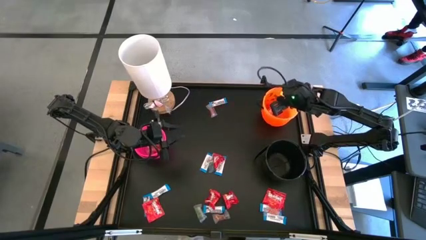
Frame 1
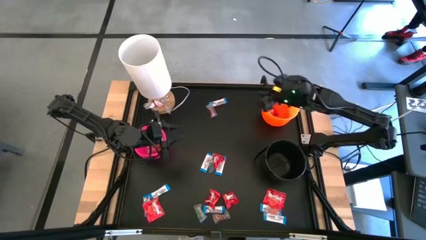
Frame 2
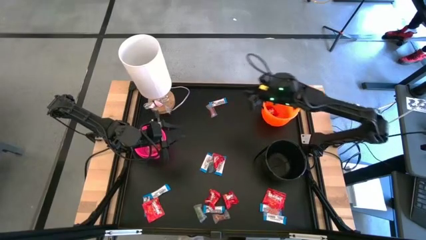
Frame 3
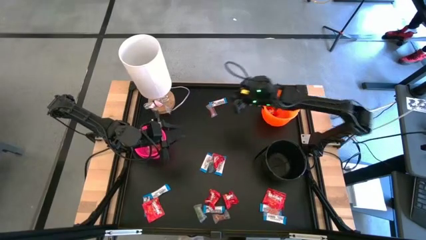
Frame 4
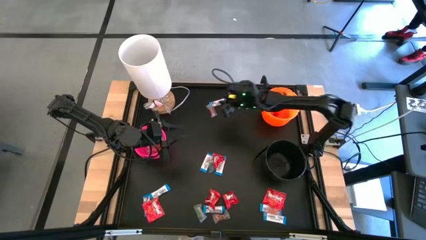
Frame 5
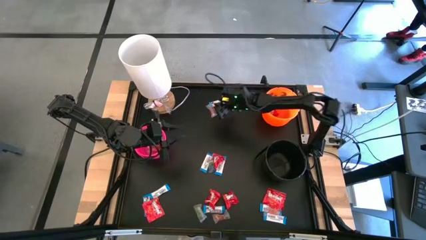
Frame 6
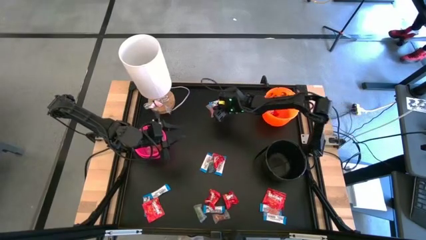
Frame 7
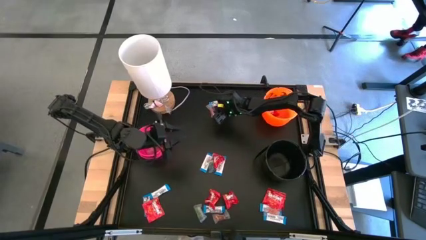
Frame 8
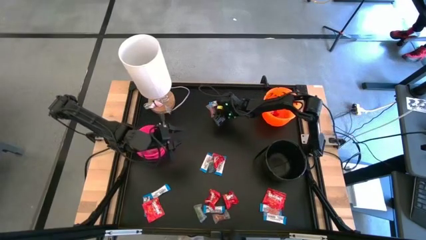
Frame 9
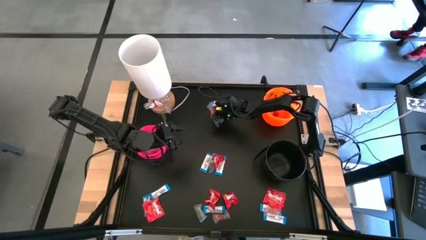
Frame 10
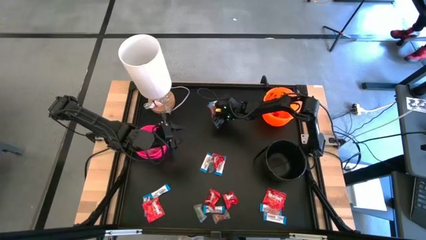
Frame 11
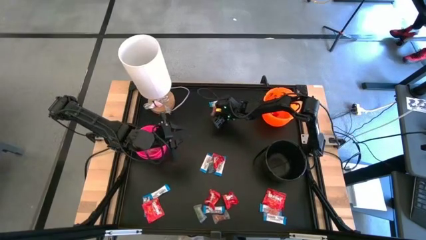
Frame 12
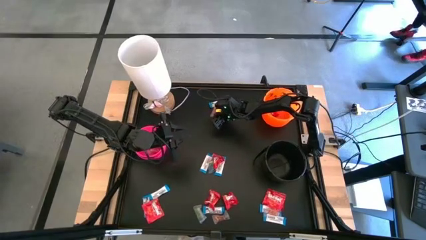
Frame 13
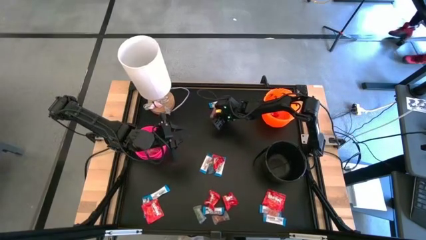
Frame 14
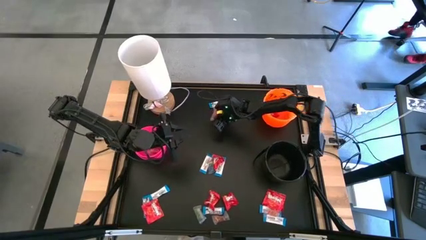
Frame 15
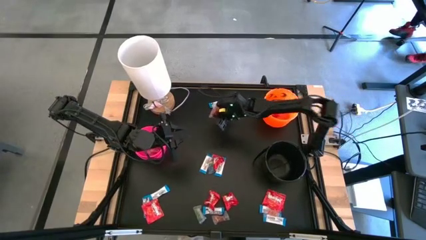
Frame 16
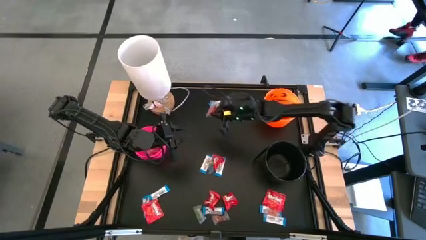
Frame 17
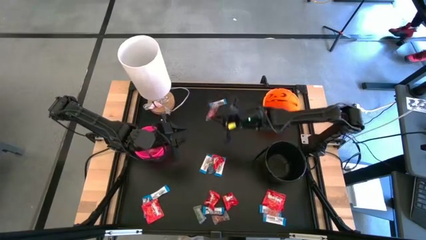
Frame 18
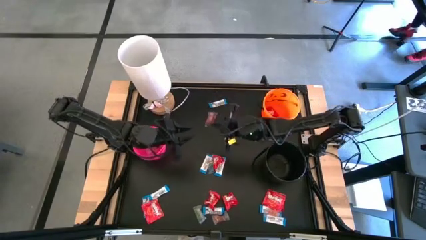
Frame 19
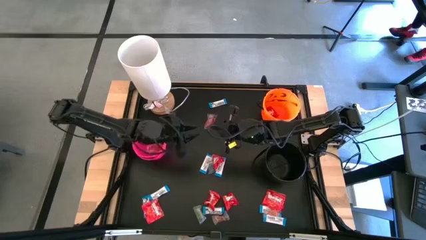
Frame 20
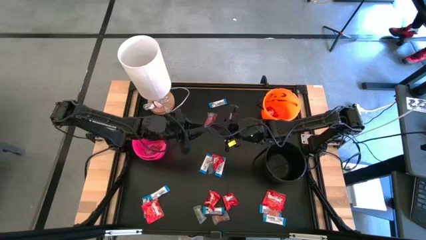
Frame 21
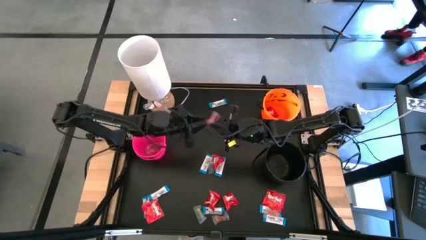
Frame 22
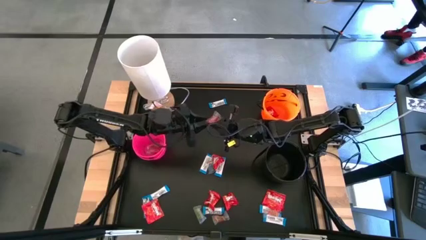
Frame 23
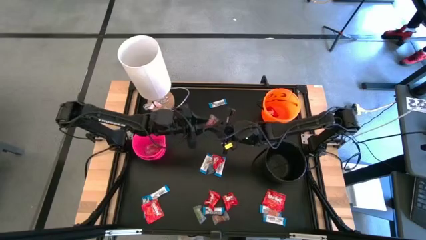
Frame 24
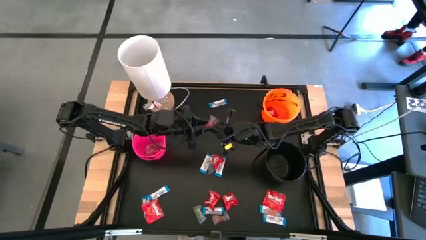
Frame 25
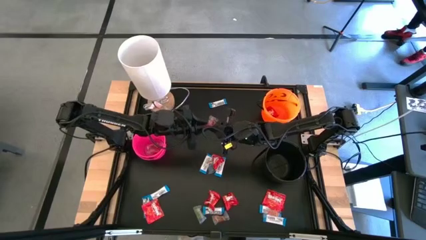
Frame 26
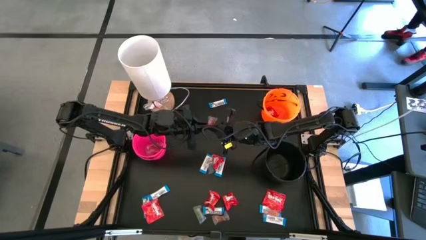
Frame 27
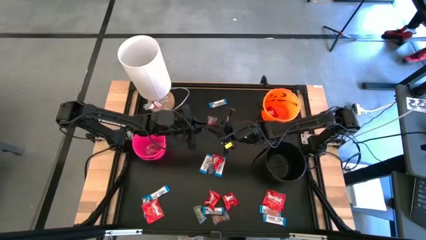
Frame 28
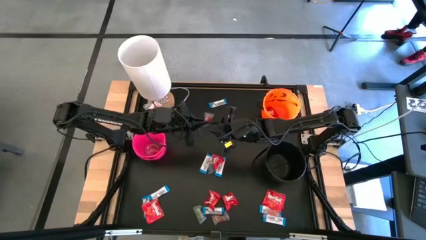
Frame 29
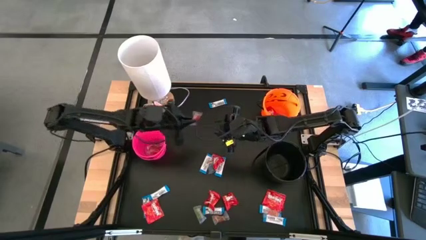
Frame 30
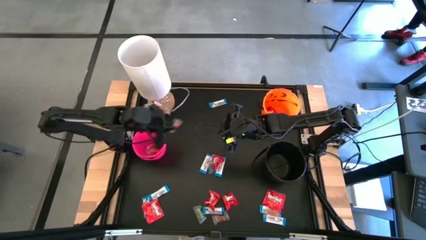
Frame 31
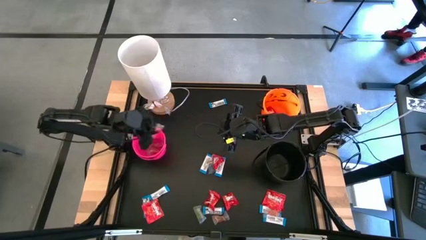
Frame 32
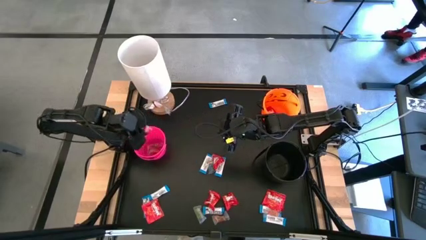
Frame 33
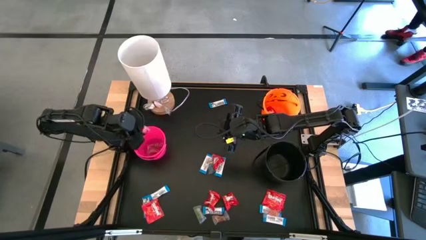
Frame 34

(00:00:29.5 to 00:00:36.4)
Task: Sort candy
Put the orange gummy into the pink bucket

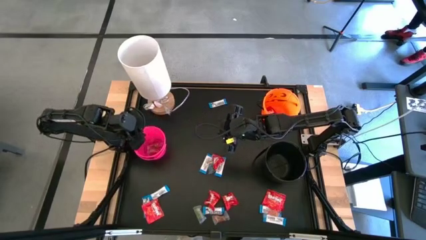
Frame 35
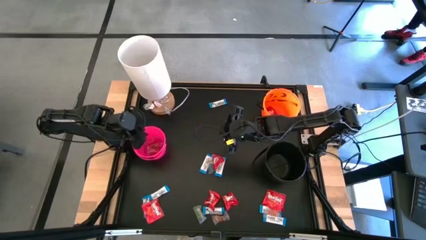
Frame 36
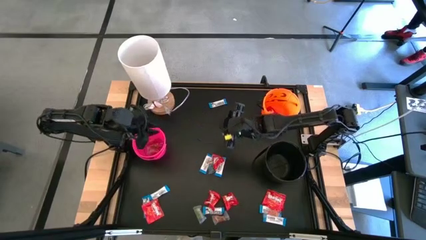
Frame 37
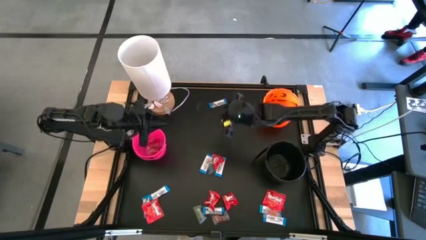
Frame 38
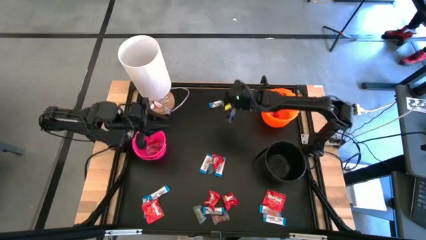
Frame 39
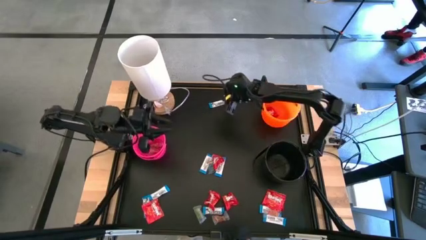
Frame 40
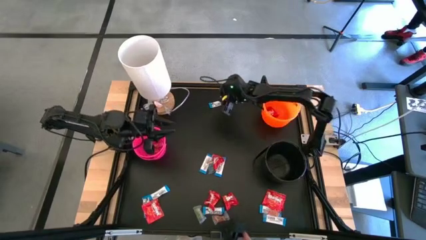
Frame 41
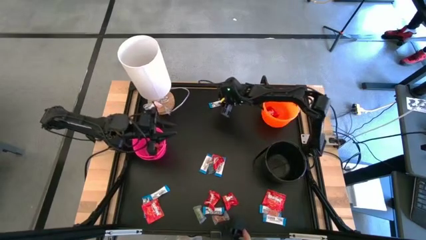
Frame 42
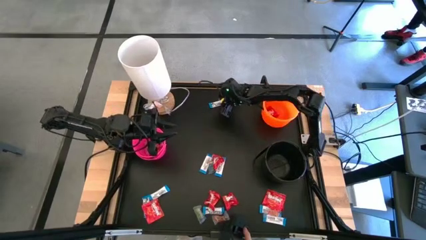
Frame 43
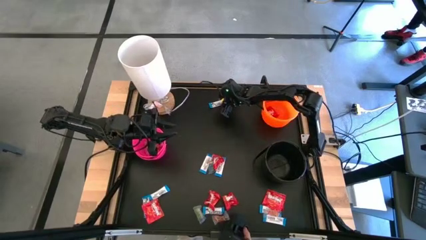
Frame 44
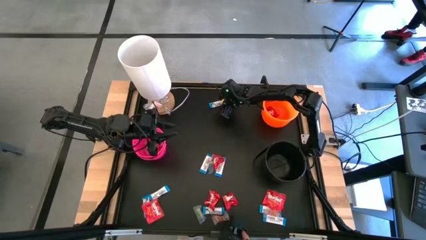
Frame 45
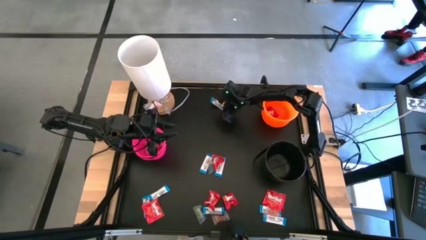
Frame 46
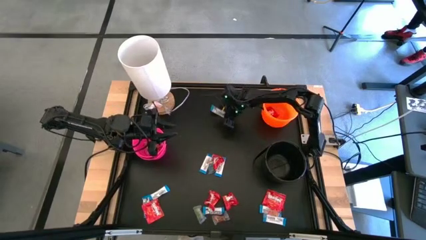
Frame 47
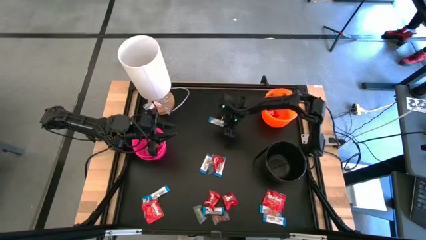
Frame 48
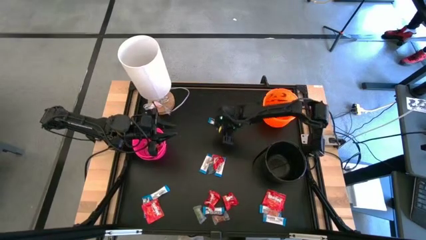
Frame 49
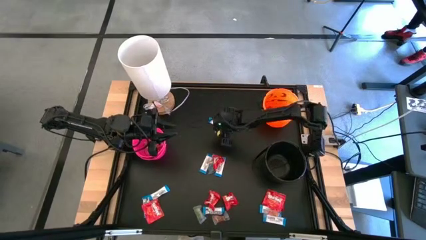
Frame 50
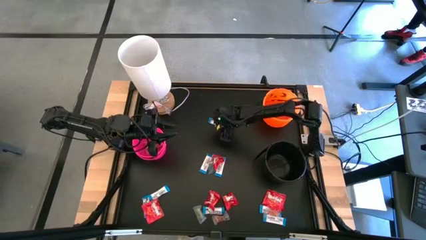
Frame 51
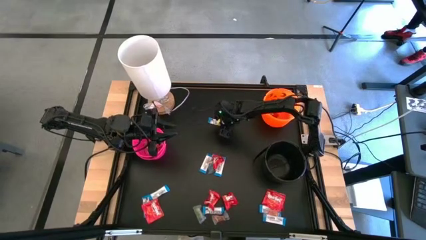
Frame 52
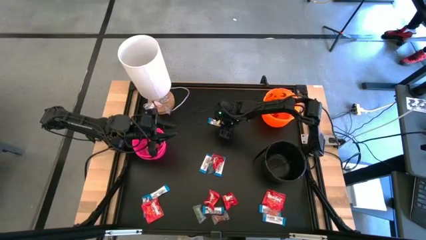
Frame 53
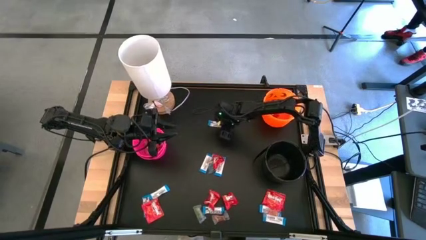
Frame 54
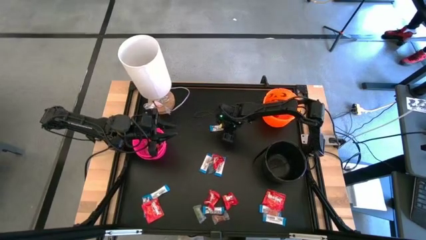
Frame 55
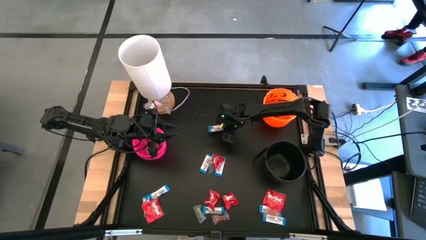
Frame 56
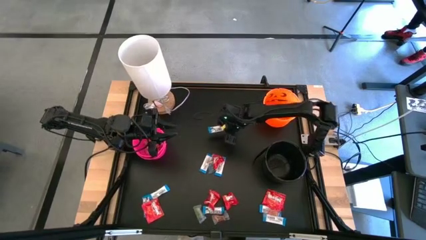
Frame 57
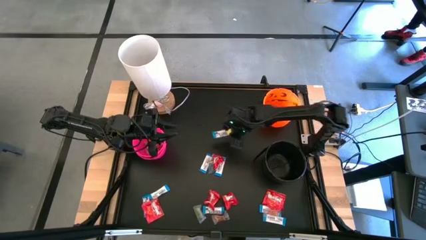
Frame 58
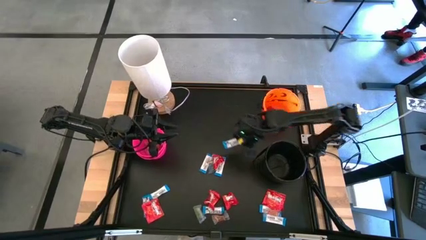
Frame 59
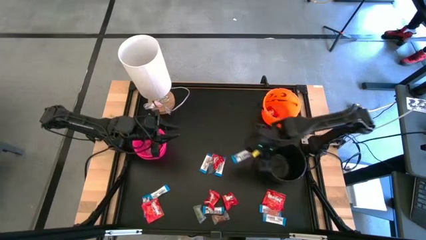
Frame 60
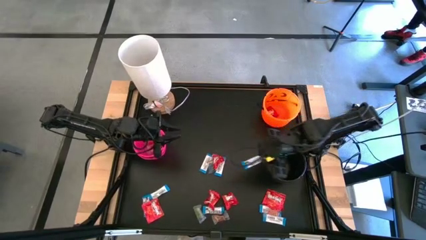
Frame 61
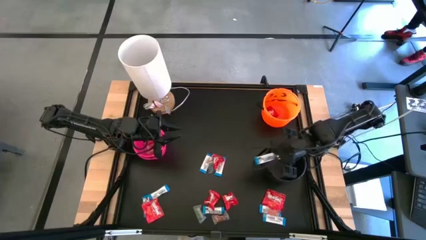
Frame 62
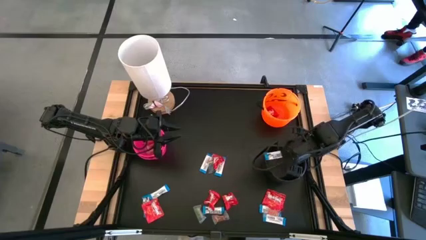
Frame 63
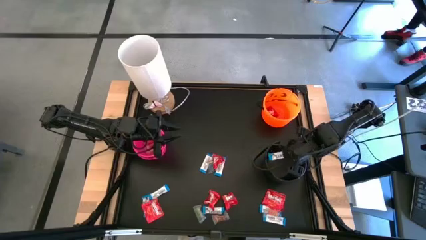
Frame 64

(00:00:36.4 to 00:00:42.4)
Put the white chocolate bar into the black bucket

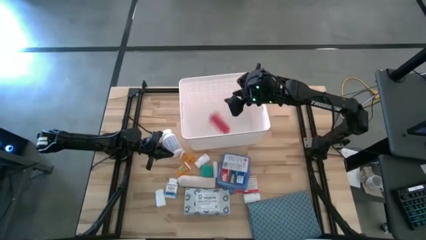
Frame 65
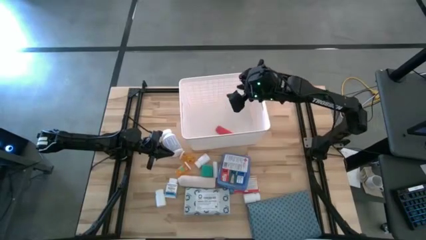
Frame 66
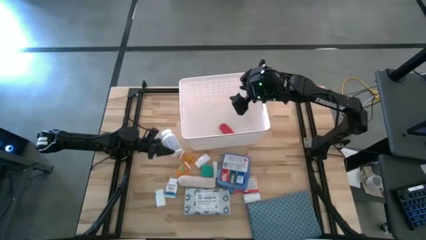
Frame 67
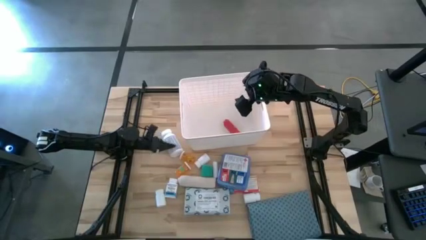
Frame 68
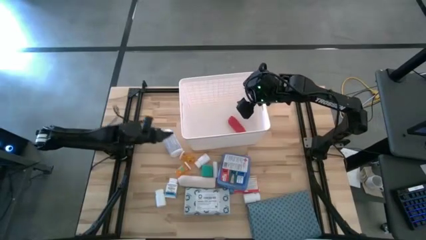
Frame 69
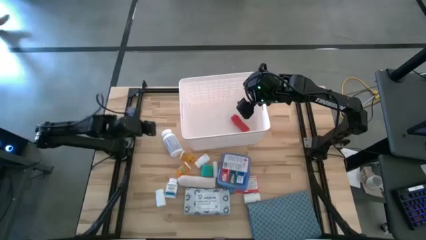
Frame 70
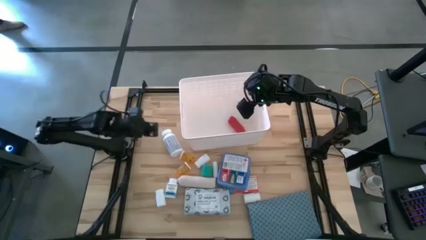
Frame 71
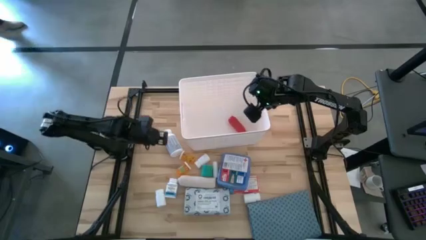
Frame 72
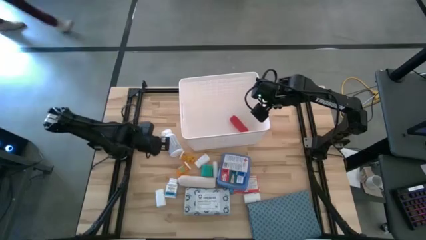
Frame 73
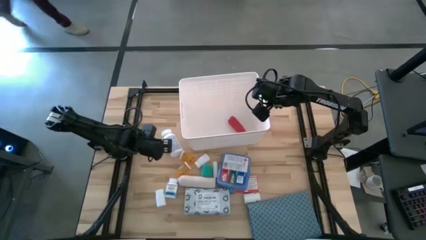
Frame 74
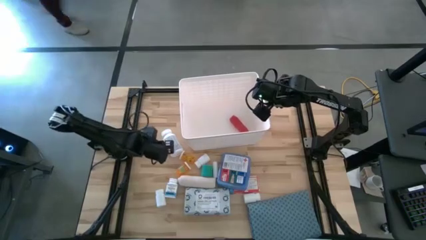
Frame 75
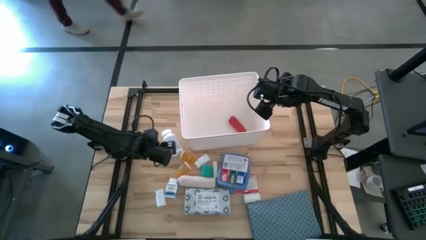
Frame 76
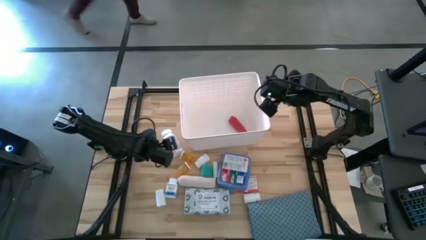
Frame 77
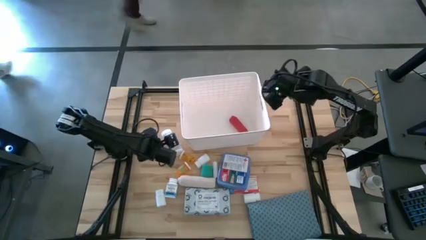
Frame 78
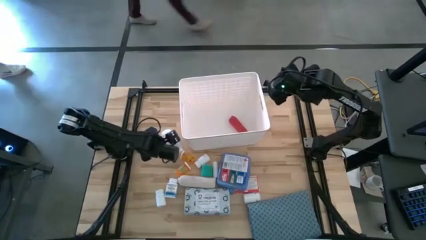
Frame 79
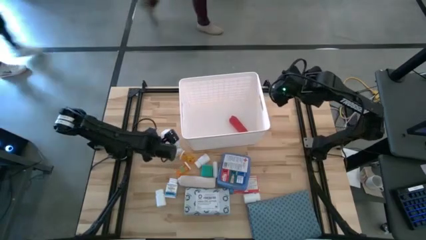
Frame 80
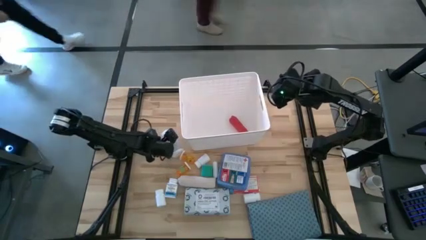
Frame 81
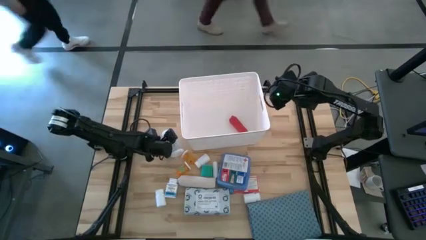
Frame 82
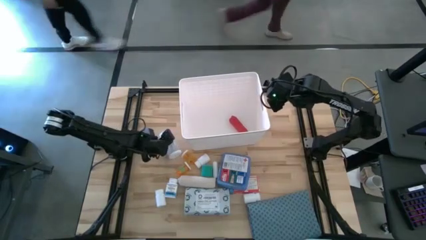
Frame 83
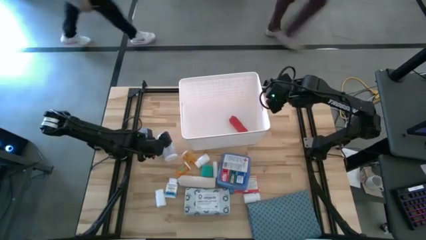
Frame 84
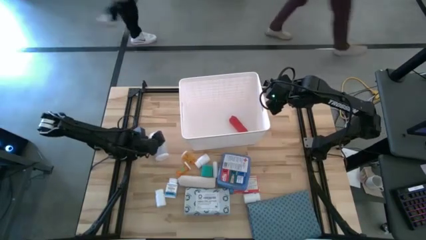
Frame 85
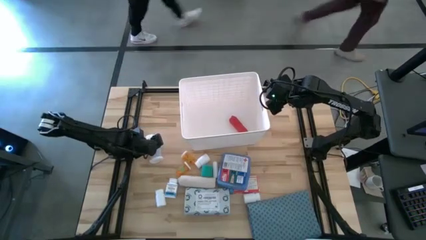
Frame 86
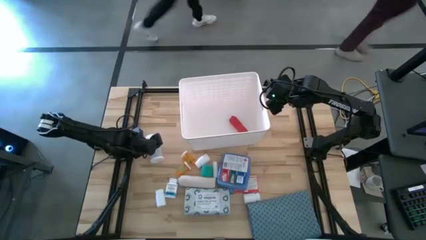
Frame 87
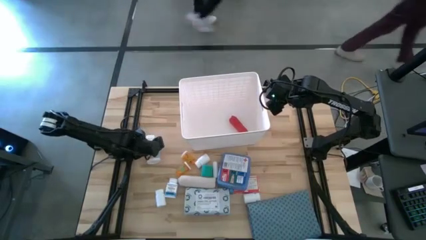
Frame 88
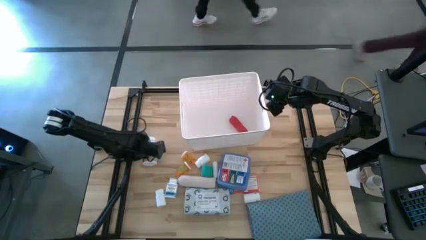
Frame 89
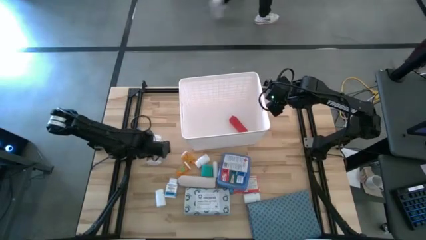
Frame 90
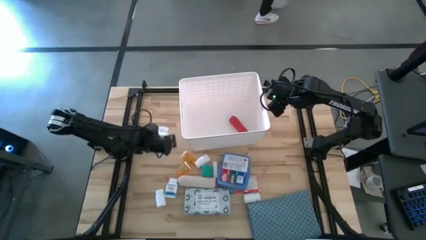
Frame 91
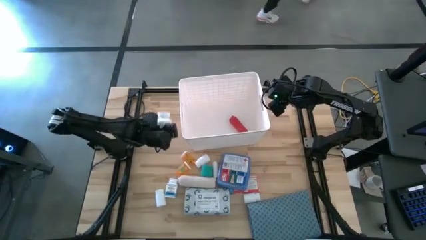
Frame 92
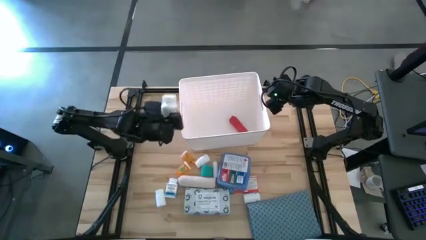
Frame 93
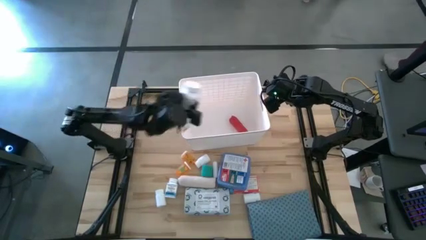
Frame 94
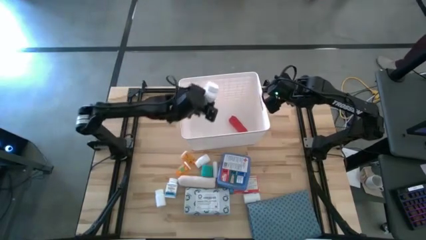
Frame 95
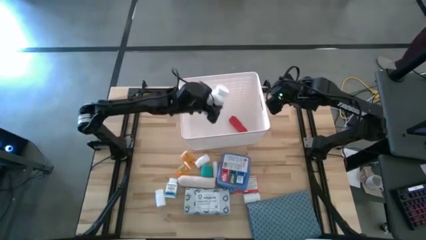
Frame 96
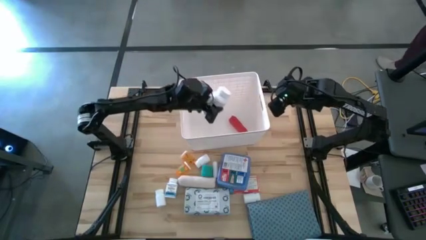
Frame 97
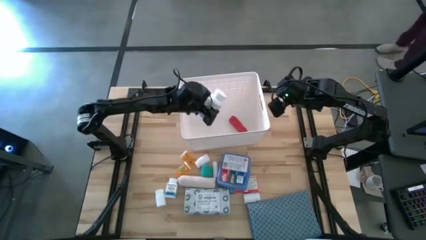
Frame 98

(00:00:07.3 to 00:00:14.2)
Task: Pick & place medical supplies in basket/bin
Put the violet and white pill bottle into the white bin
